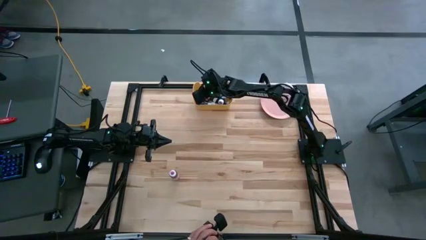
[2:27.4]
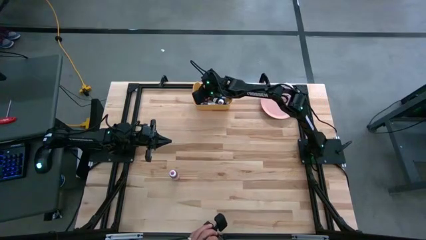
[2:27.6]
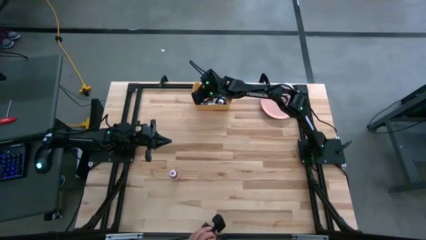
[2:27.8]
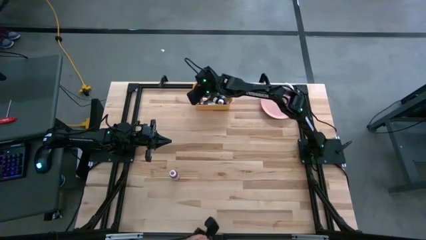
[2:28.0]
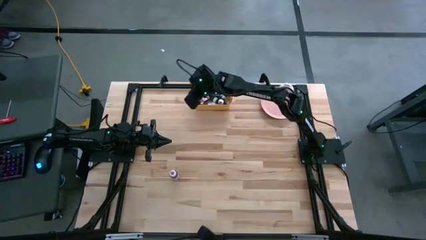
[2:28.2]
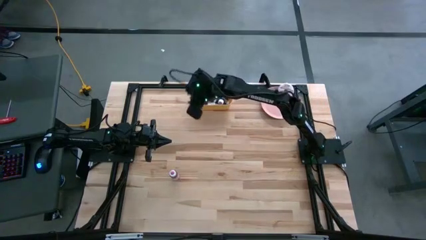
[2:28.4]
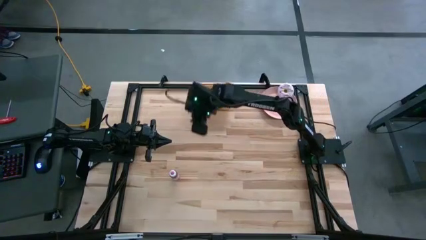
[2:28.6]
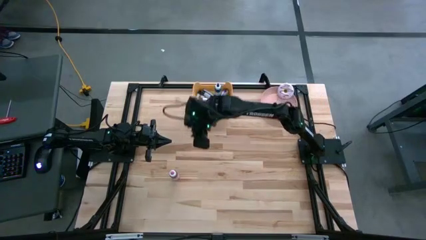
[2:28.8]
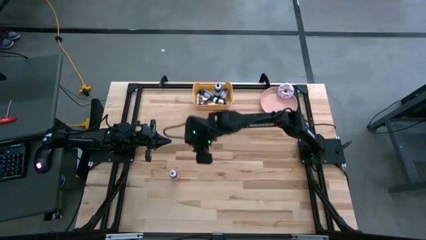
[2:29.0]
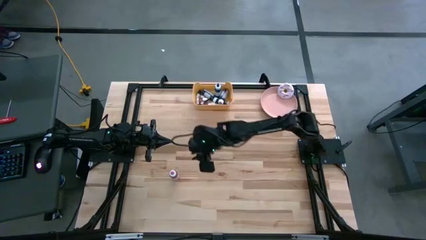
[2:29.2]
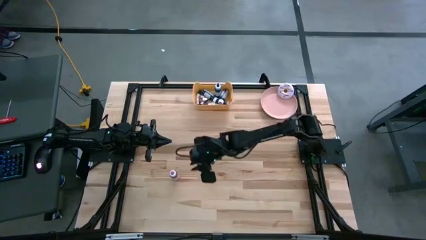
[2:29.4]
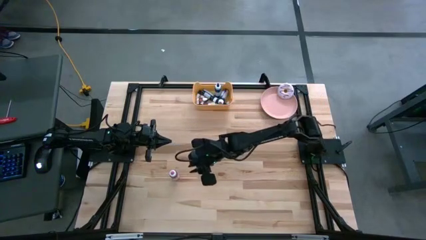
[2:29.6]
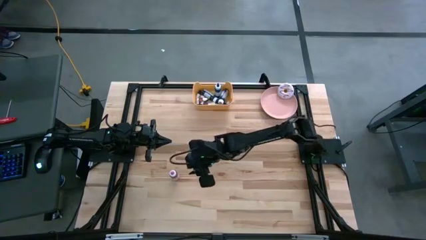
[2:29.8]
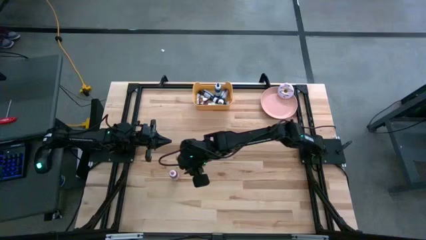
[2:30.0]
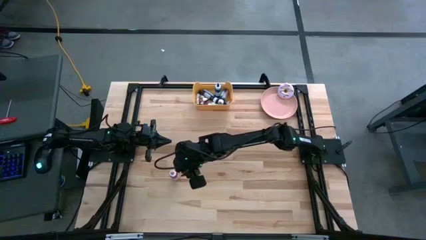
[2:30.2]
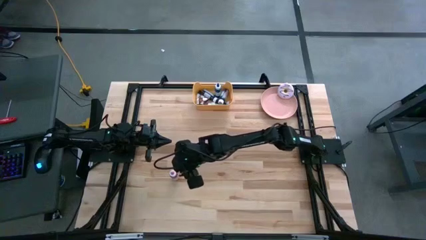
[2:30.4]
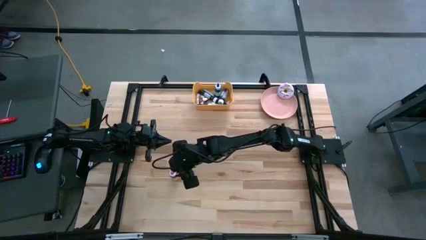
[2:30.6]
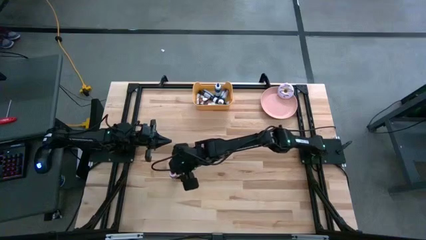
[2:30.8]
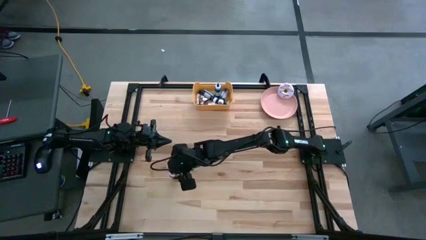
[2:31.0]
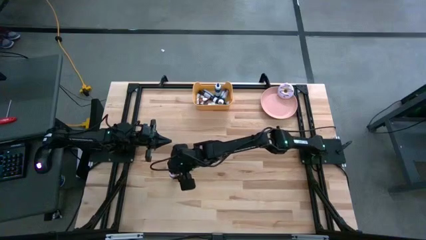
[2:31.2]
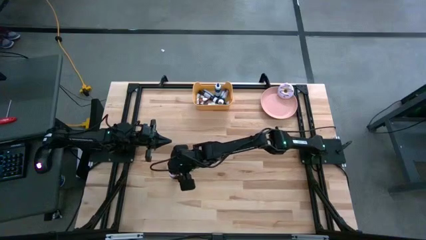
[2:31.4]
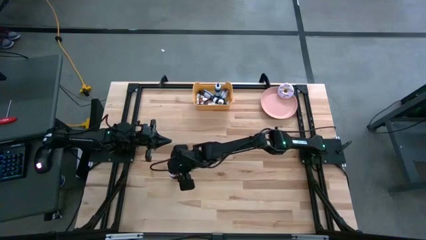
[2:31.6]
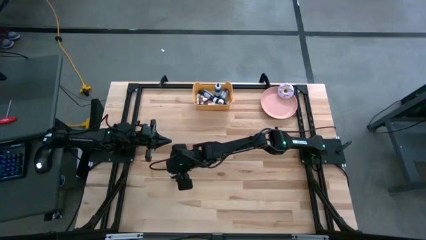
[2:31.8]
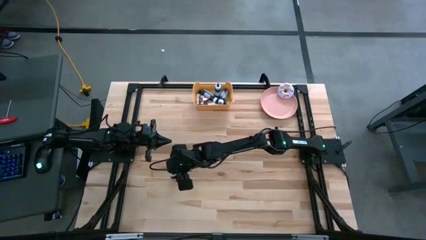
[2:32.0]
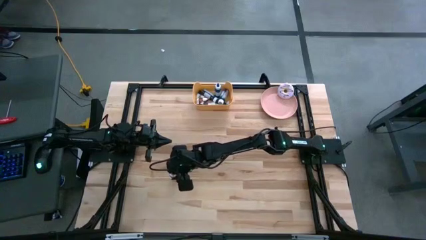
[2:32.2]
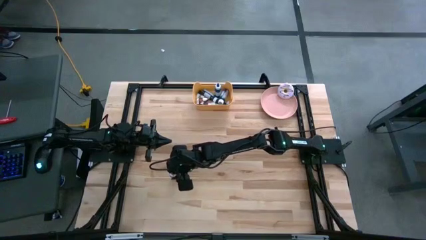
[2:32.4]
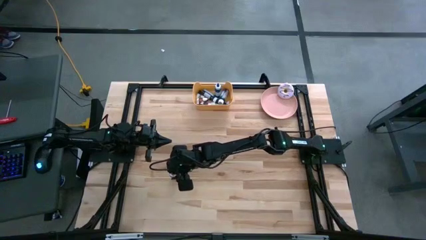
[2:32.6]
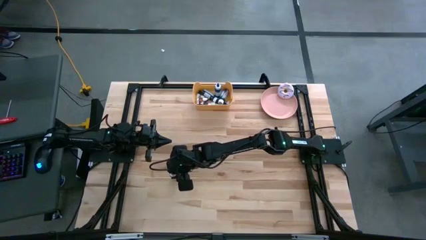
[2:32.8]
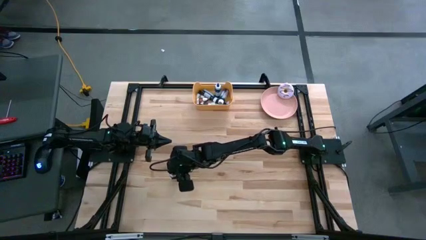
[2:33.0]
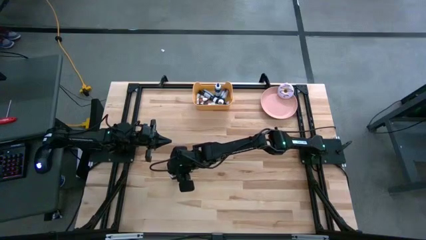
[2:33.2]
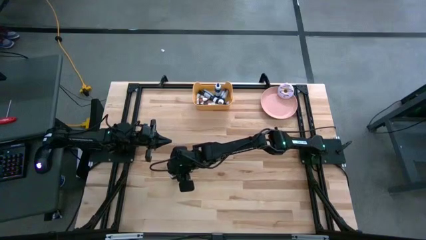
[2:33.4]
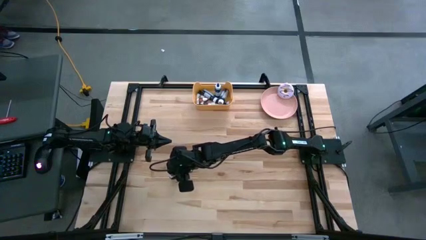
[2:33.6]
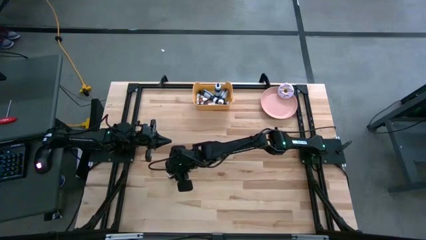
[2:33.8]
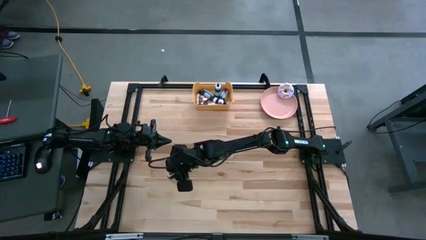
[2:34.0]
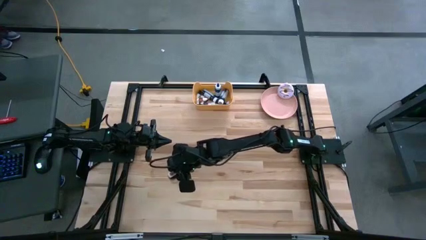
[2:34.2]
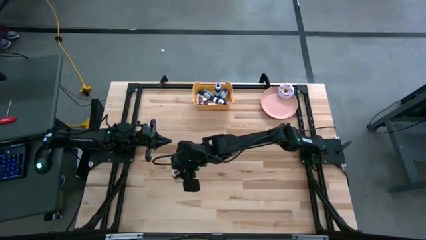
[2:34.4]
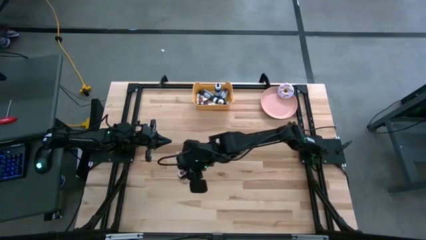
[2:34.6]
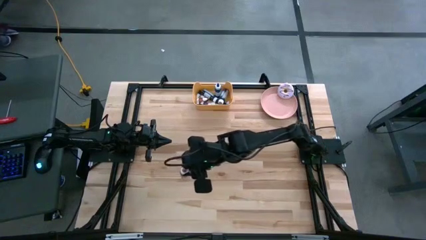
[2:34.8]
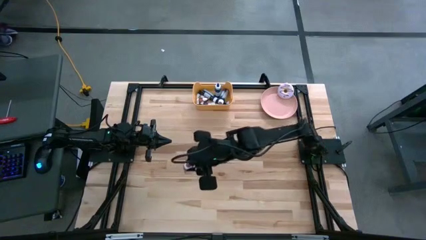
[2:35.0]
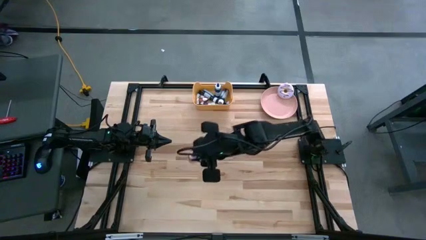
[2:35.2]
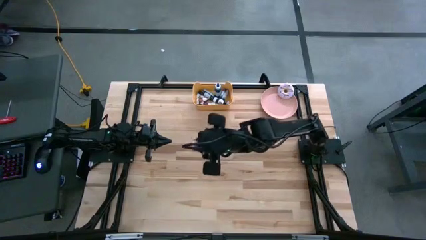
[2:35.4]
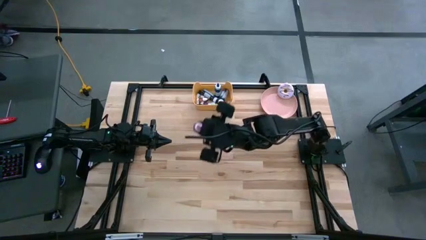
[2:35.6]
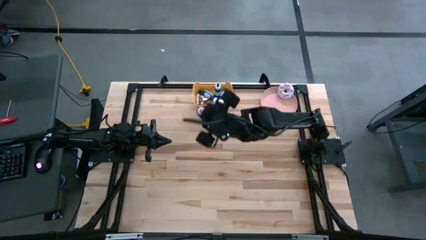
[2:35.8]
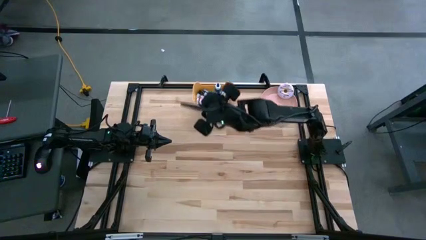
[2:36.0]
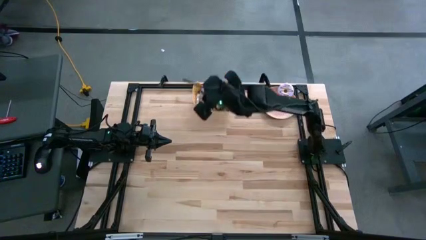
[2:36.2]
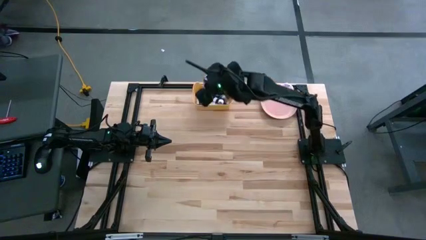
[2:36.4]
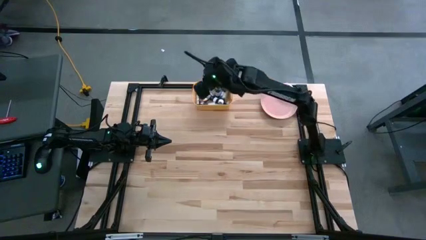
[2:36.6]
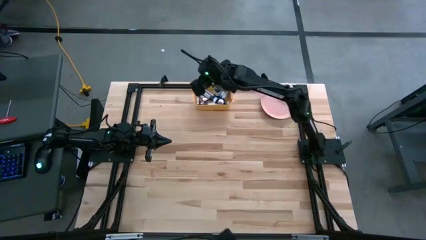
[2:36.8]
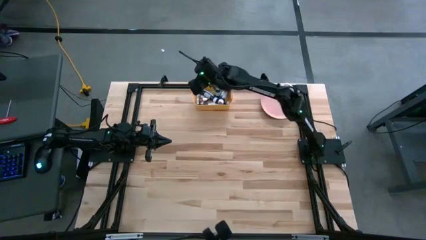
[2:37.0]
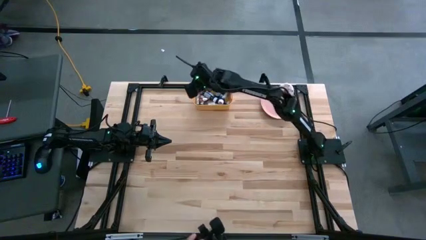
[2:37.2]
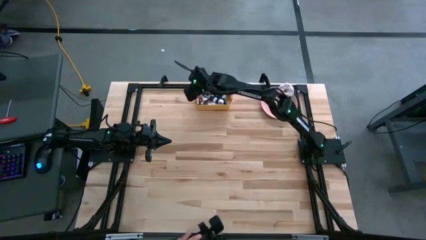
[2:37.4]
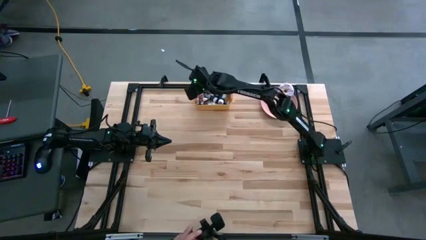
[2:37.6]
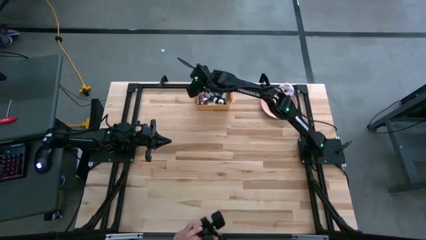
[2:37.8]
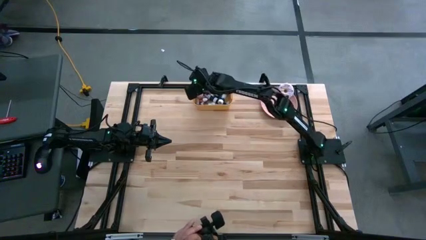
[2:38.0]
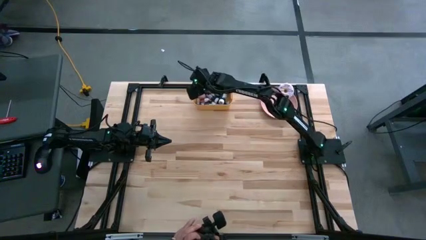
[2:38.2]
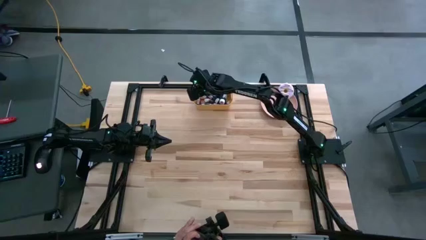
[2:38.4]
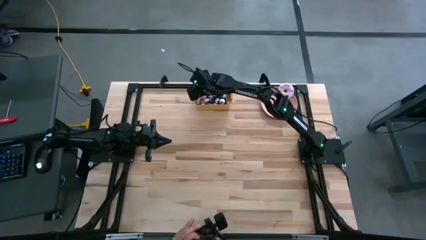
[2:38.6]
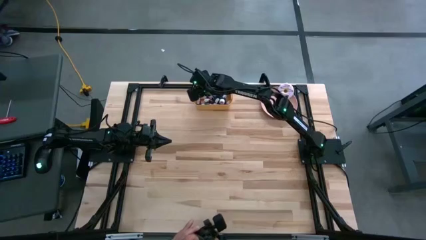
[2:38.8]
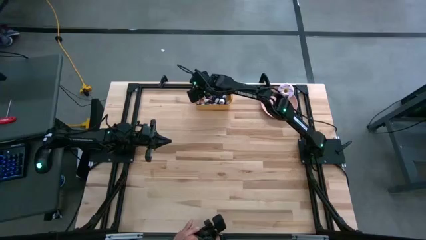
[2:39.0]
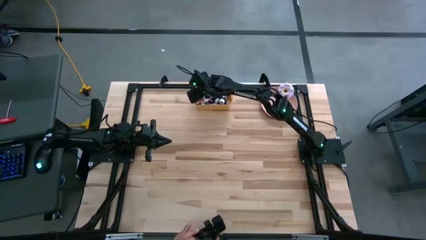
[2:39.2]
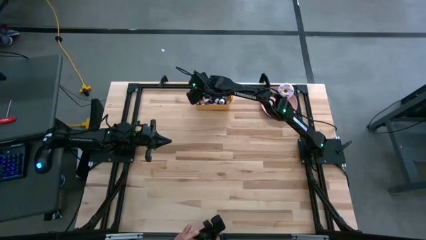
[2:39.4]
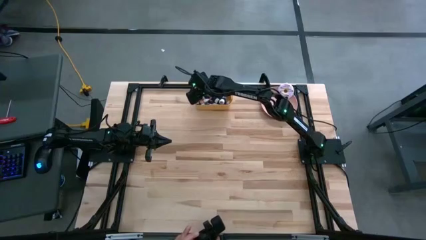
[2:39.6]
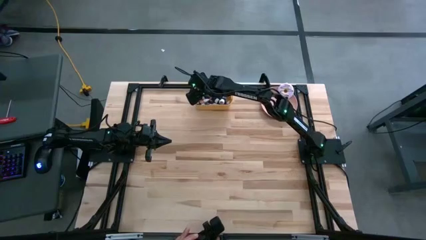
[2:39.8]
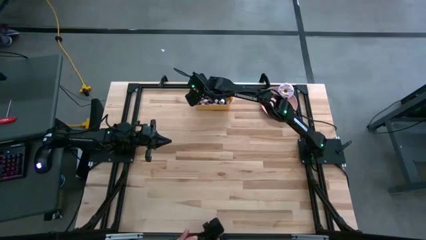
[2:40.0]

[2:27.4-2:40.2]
Task: Pick & Place food coloring
Put the big pink food coloring bottle into the yellow bin

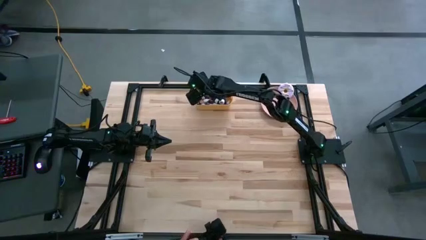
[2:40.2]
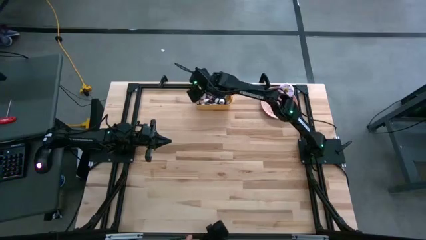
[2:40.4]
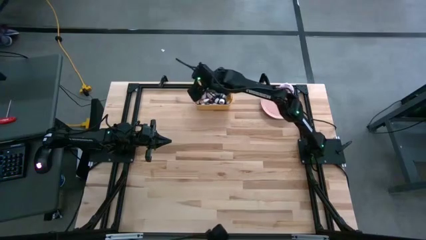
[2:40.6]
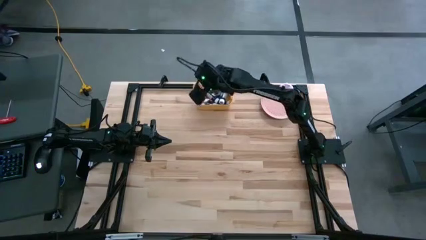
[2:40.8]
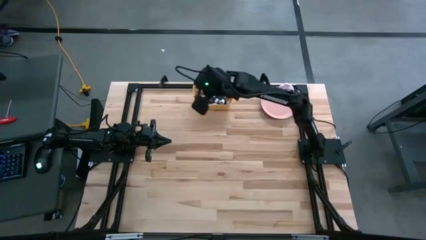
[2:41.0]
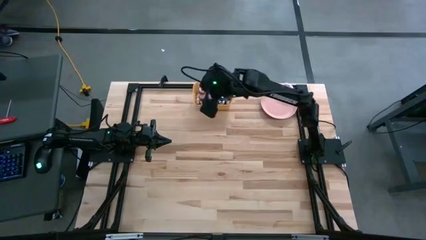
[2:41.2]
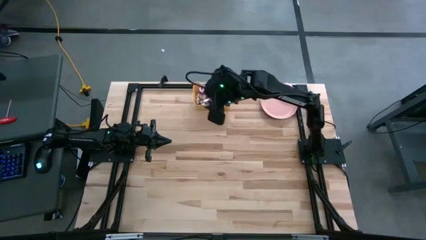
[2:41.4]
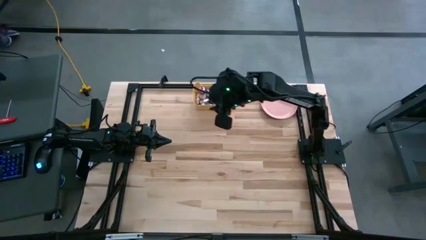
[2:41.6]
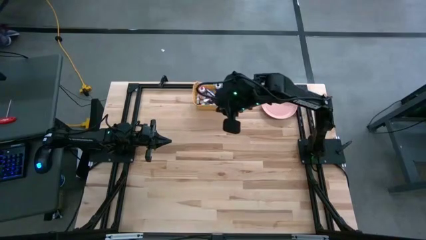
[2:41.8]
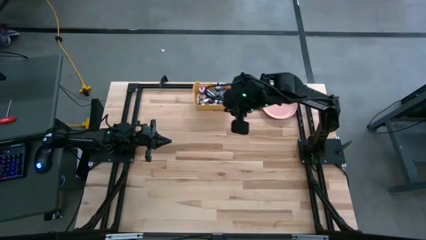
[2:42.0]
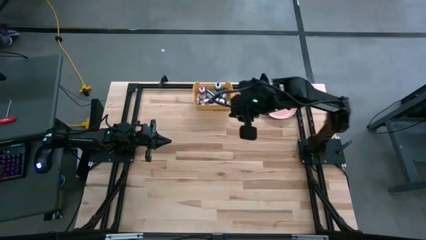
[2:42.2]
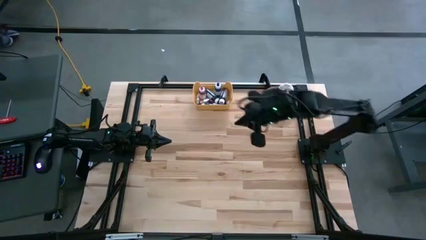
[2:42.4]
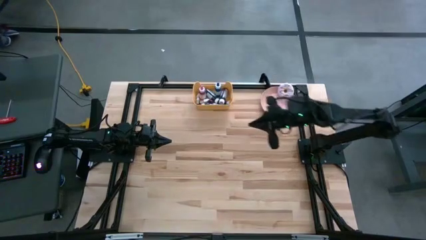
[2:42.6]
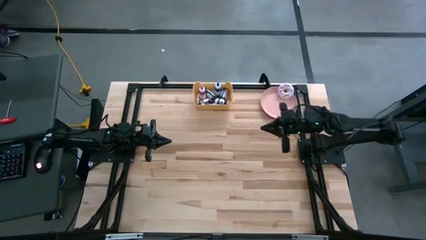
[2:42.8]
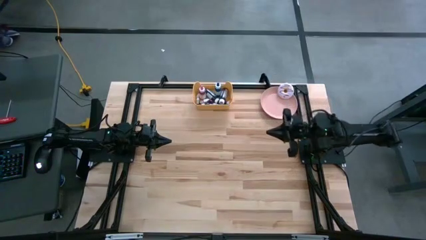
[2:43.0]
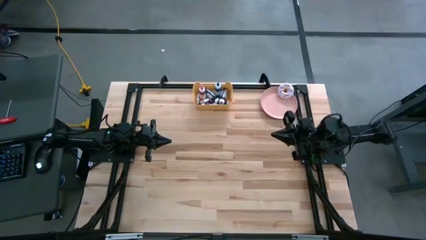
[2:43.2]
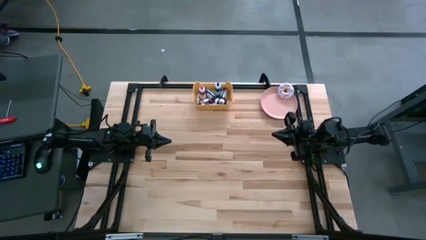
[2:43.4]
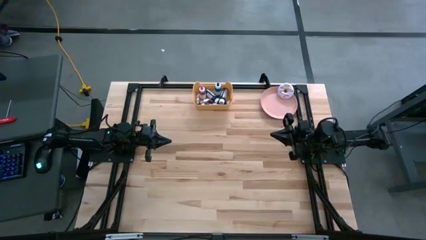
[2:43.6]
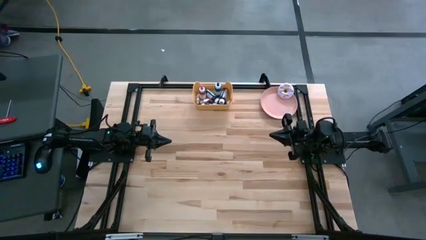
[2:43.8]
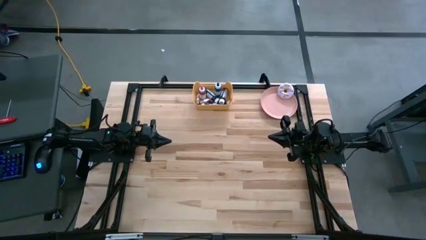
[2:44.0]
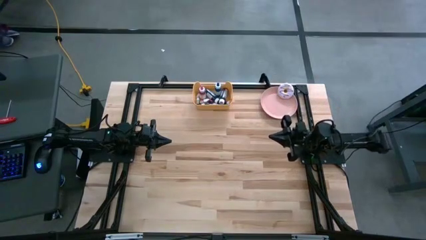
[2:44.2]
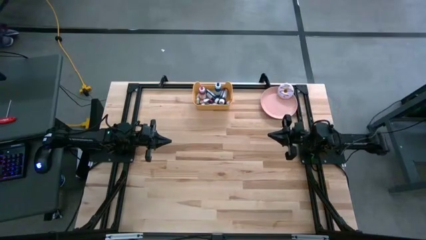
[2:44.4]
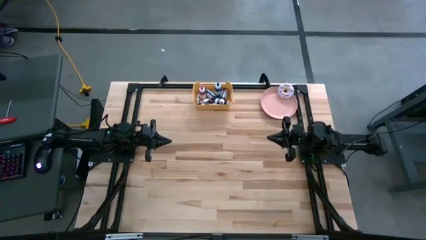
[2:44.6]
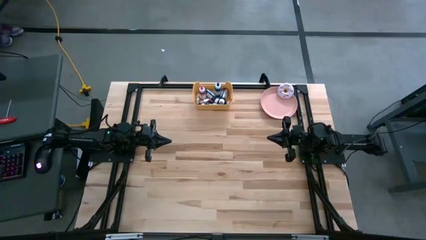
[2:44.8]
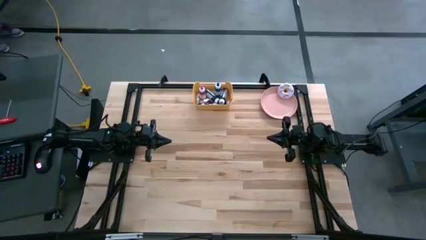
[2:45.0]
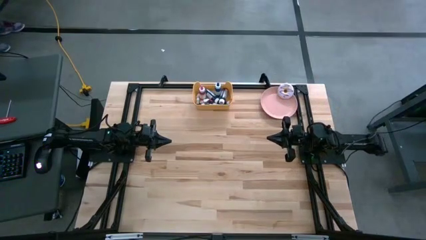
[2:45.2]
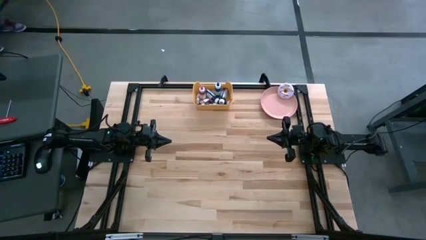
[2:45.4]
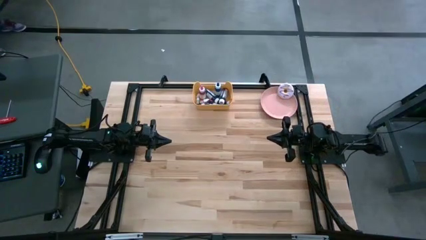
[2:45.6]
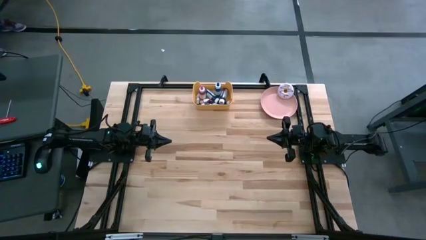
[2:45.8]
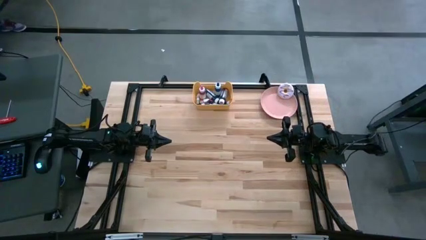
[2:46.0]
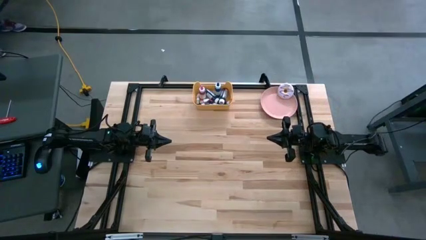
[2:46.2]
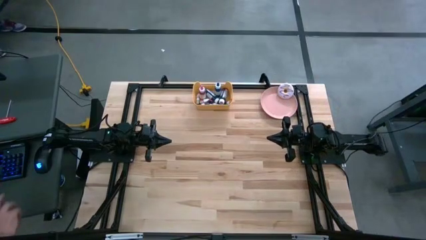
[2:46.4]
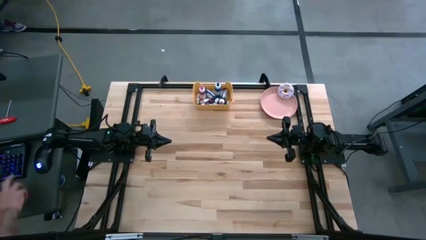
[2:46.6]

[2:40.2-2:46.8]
Return to Home Position
